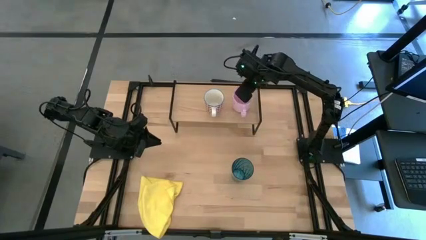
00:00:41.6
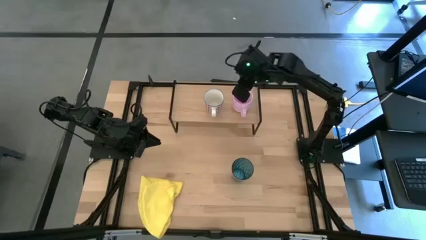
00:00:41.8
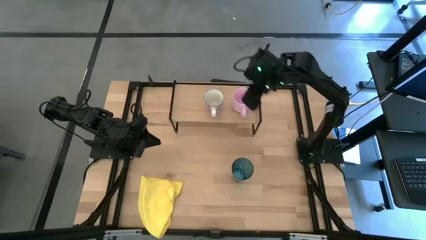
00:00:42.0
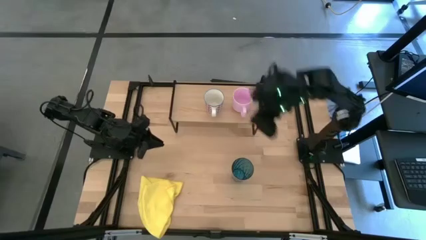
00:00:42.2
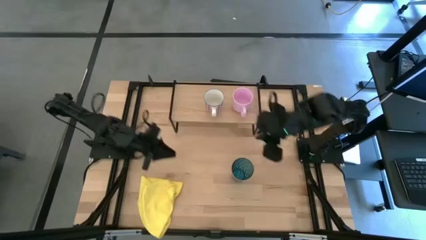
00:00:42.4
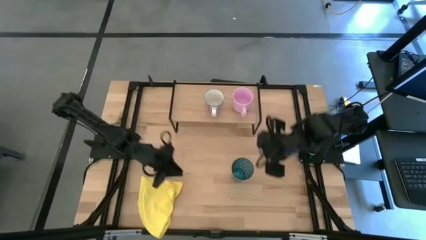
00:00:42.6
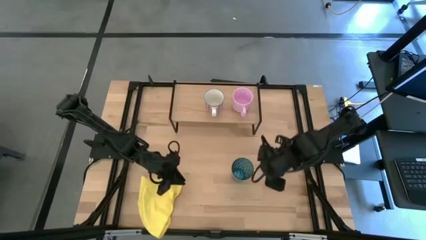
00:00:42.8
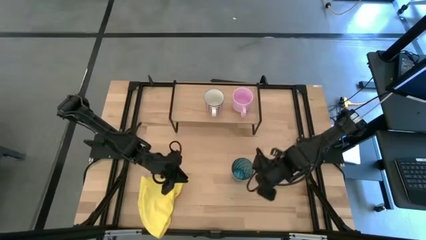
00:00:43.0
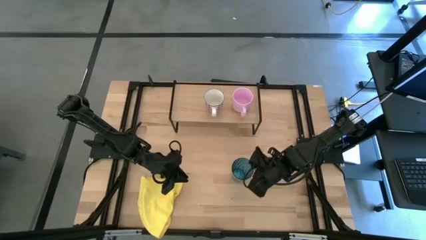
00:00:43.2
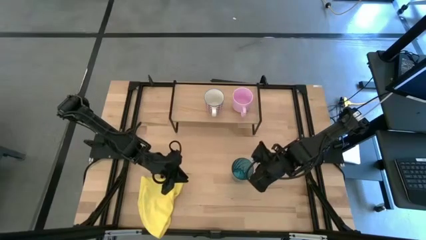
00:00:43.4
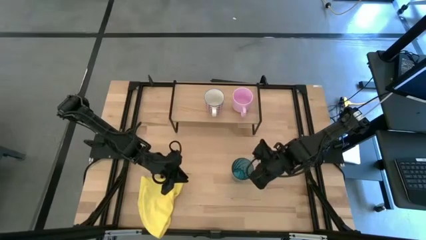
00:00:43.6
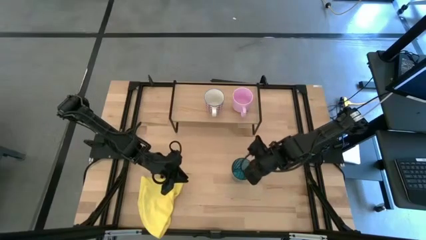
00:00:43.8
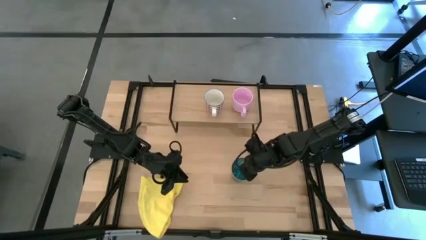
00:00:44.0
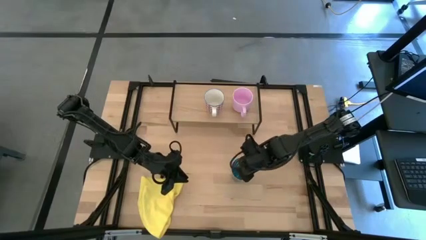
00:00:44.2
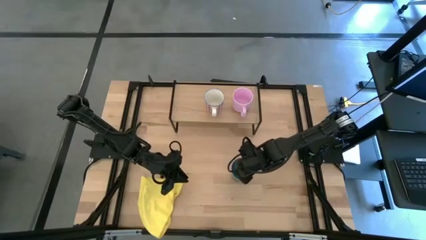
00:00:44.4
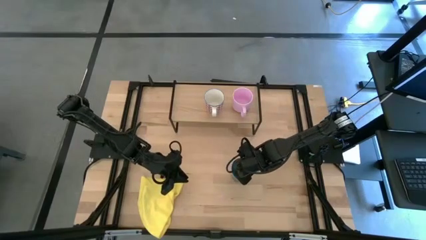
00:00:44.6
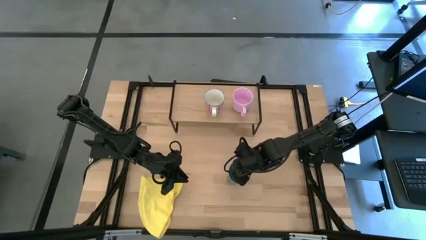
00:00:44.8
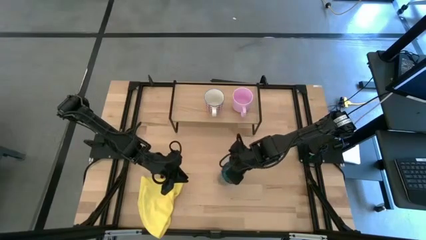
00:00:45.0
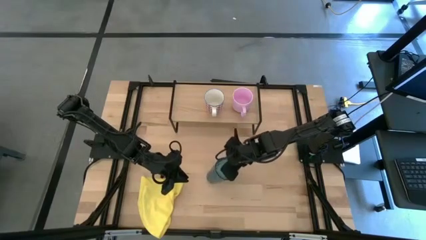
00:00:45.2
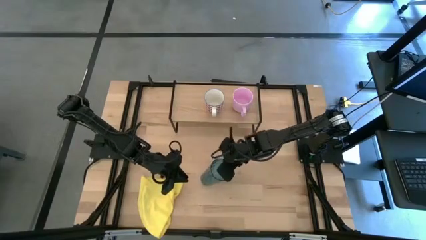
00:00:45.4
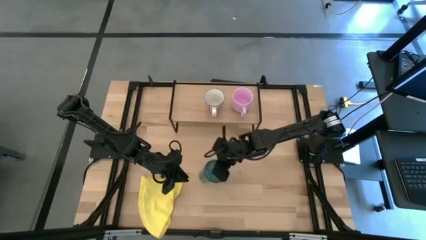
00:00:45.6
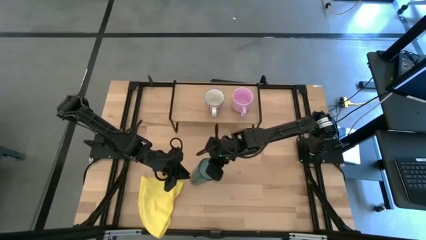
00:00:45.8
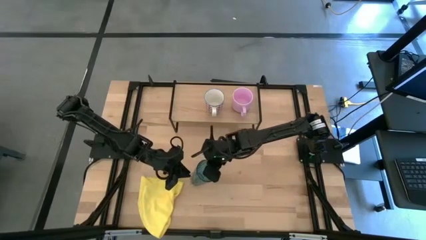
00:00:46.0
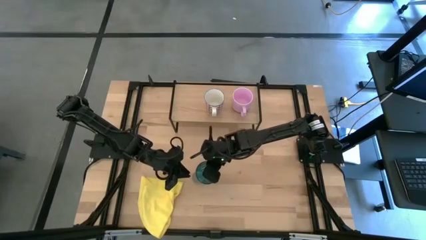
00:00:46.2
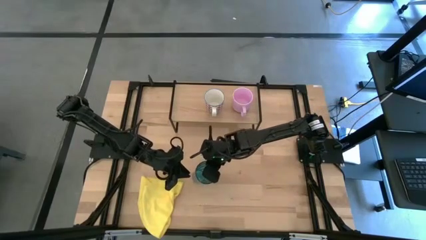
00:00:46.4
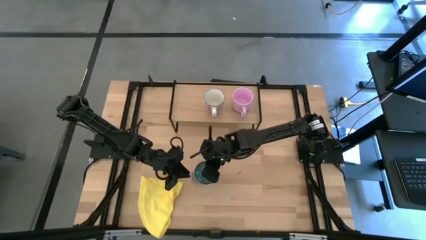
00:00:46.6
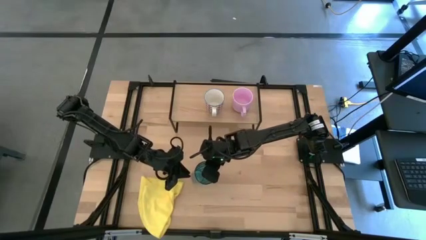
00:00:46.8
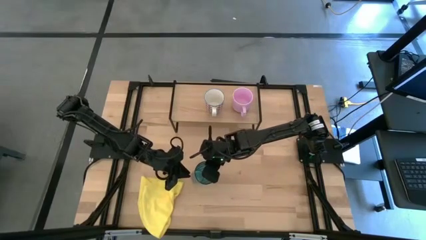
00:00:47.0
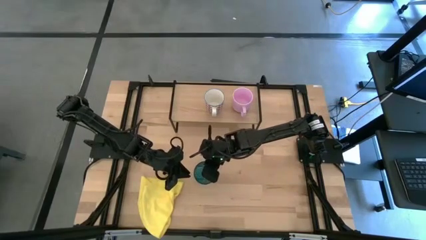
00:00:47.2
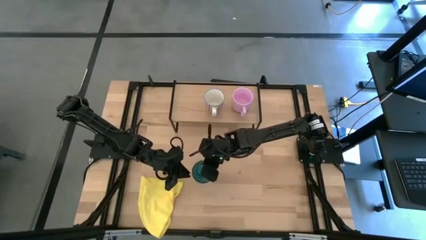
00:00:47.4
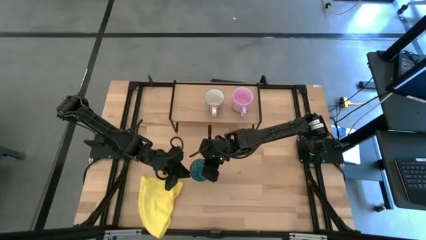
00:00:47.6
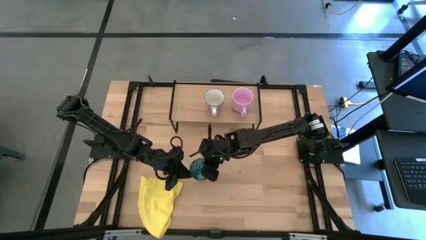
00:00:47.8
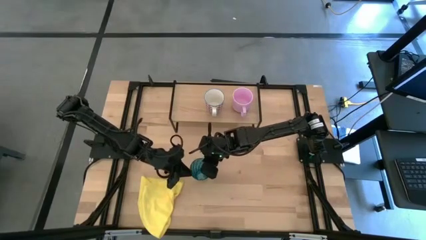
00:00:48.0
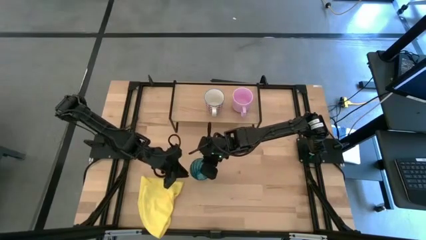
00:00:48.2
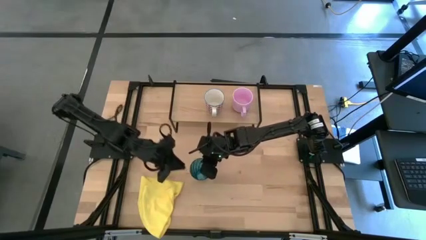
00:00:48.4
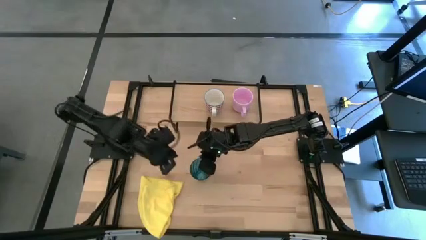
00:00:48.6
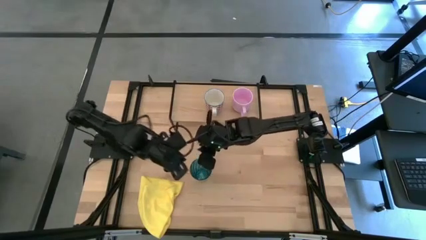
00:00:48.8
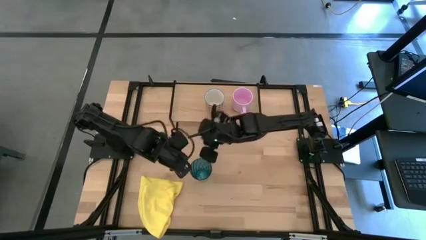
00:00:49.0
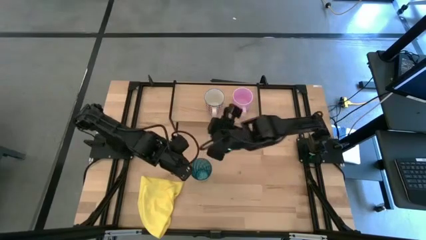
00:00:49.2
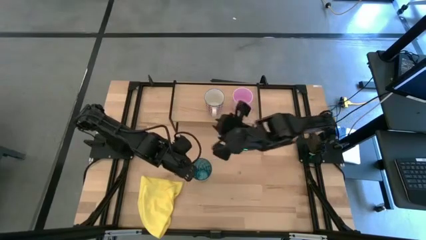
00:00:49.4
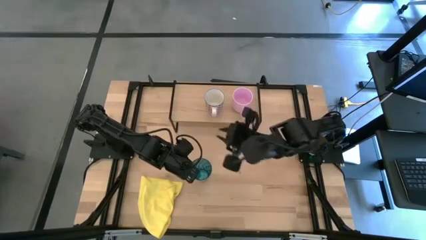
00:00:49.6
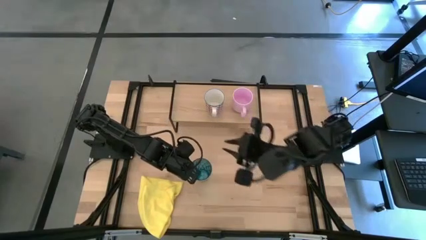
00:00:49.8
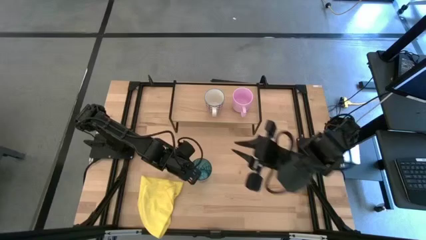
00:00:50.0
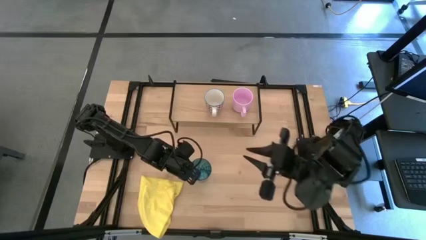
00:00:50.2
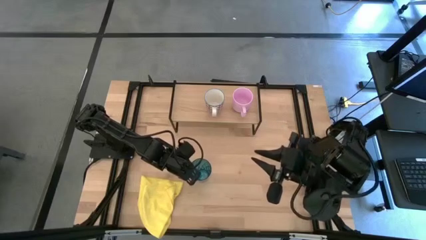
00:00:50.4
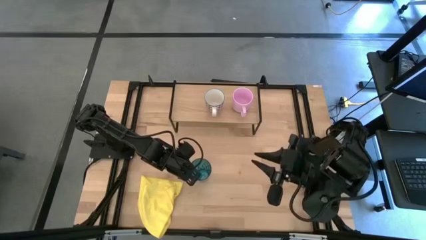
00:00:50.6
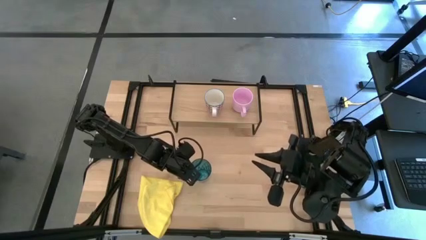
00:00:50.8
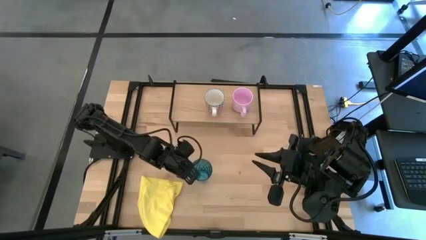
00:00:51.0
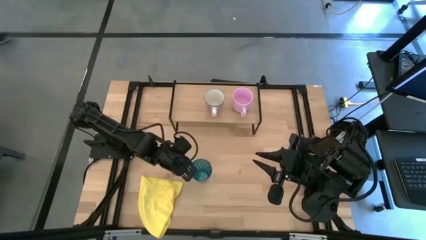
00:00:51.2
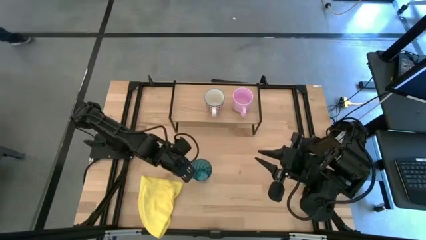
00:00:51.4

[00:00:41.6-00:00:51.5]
Task: Stack small to large cups/mugs on shelf
Put the blue cup on the shelf
